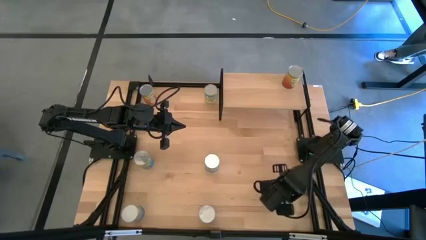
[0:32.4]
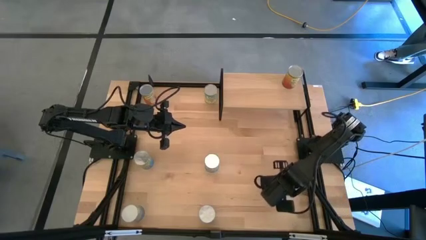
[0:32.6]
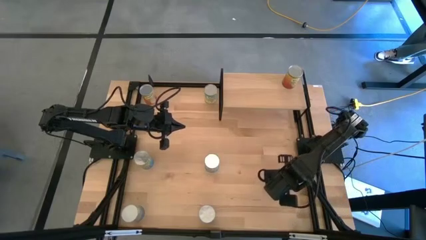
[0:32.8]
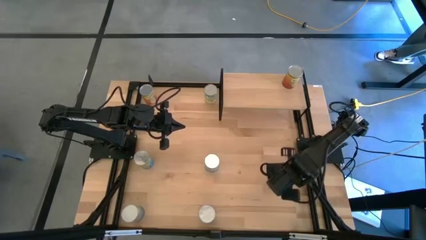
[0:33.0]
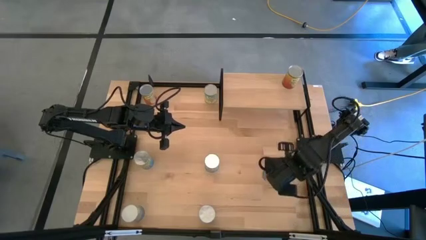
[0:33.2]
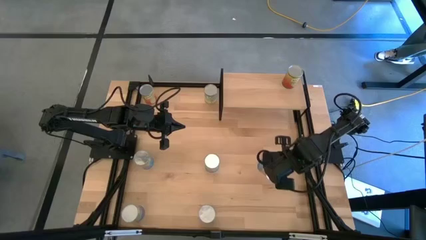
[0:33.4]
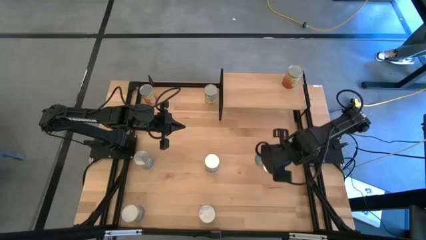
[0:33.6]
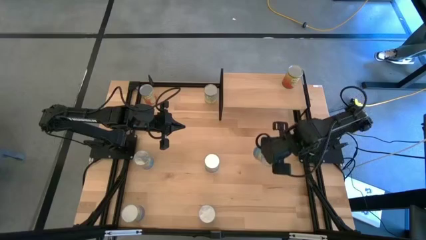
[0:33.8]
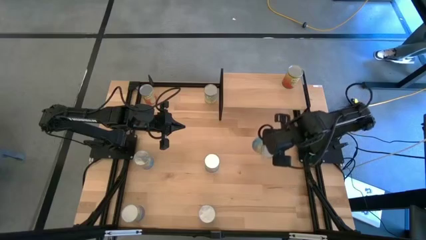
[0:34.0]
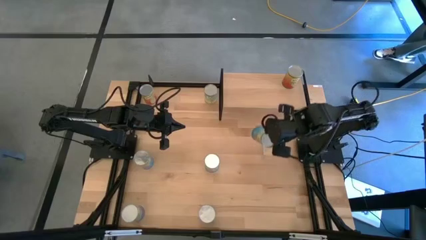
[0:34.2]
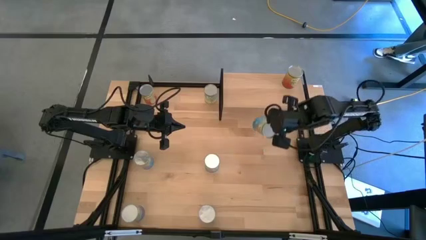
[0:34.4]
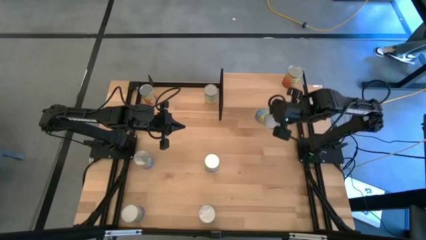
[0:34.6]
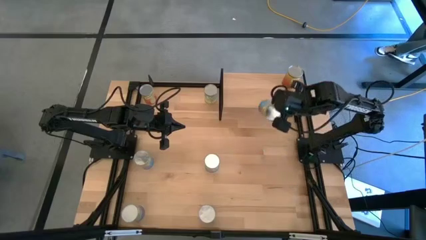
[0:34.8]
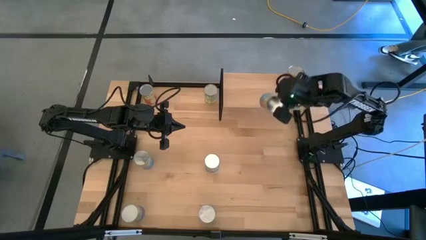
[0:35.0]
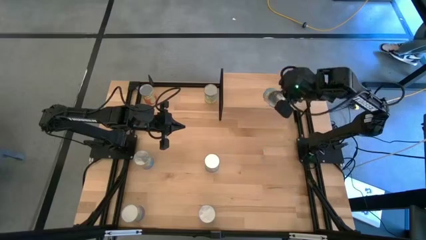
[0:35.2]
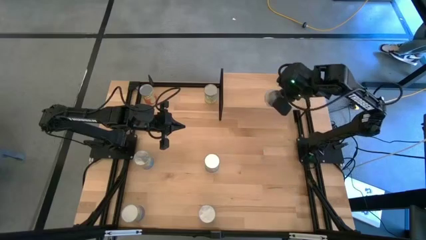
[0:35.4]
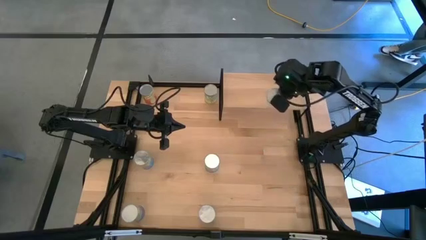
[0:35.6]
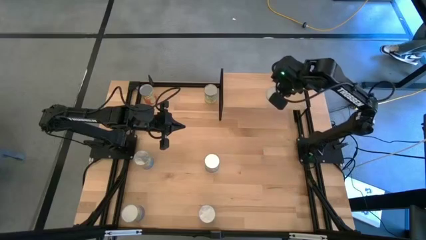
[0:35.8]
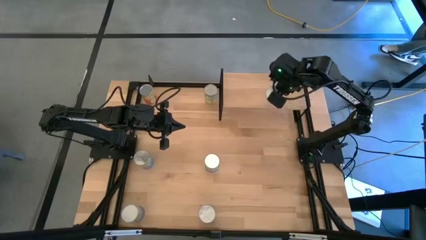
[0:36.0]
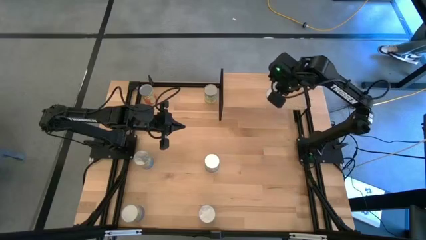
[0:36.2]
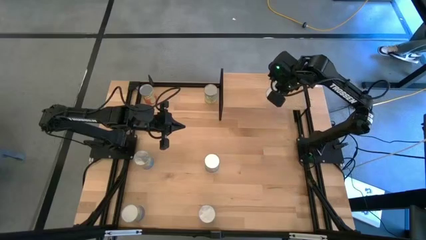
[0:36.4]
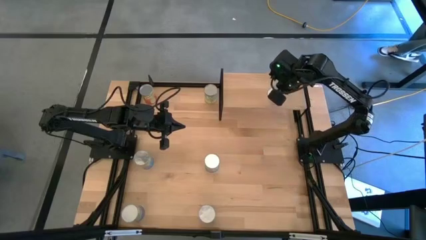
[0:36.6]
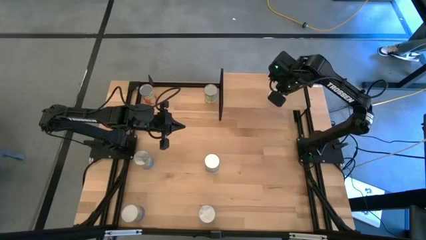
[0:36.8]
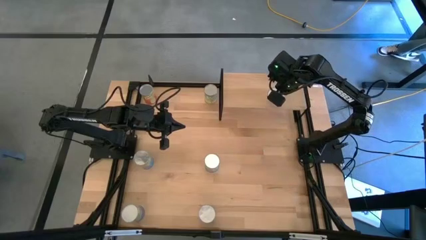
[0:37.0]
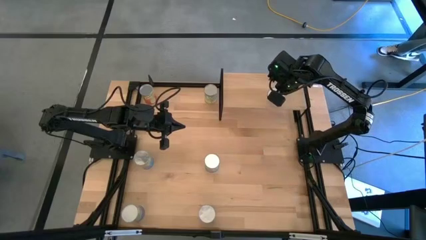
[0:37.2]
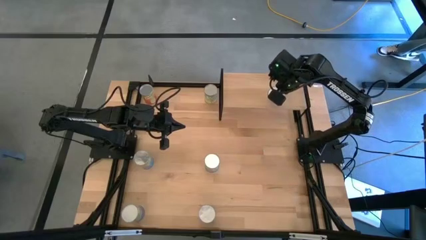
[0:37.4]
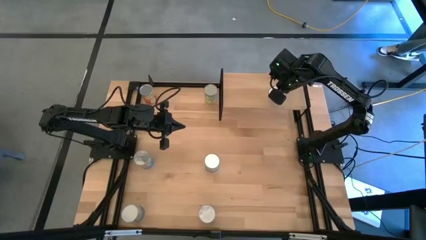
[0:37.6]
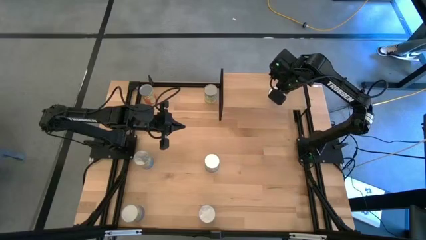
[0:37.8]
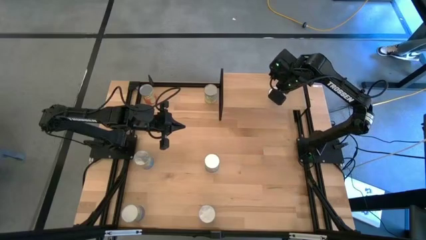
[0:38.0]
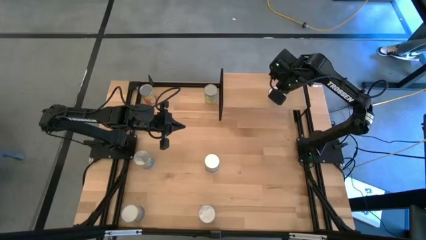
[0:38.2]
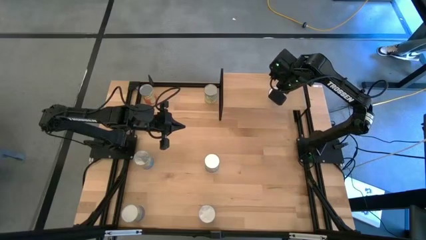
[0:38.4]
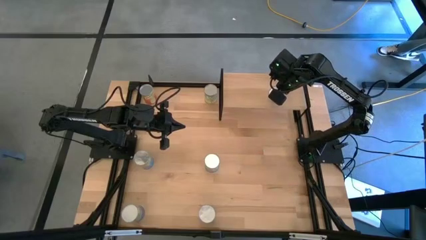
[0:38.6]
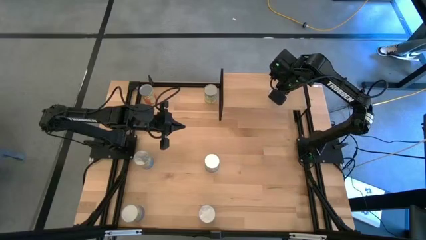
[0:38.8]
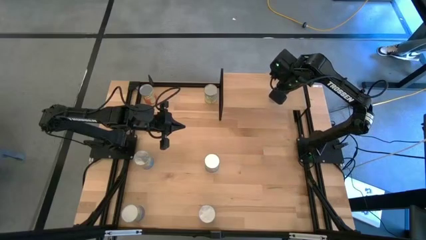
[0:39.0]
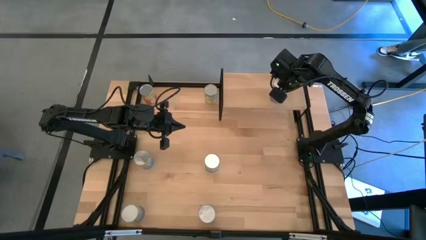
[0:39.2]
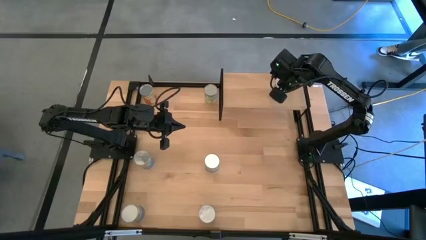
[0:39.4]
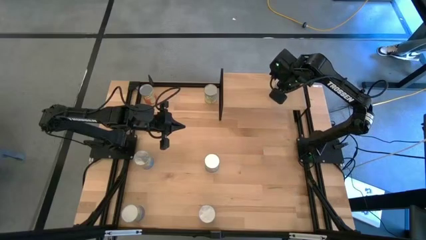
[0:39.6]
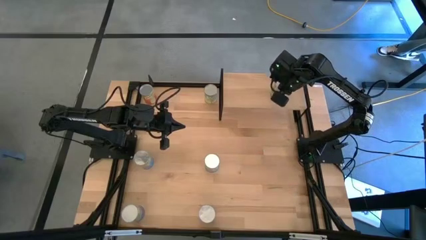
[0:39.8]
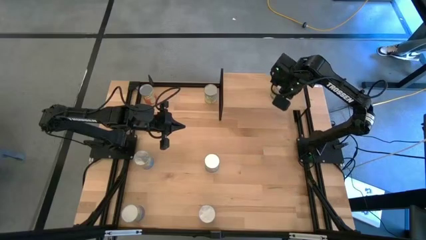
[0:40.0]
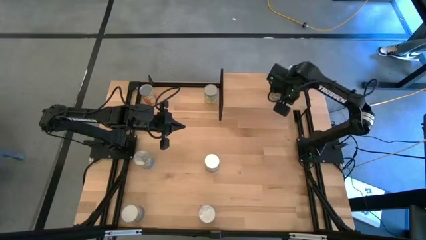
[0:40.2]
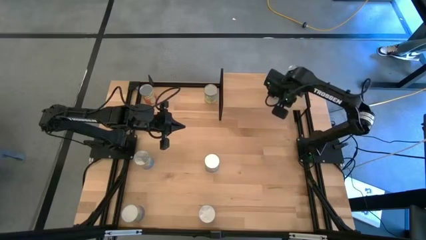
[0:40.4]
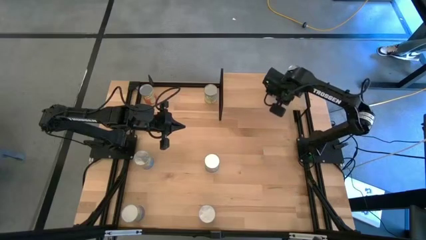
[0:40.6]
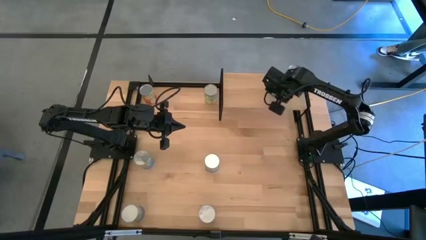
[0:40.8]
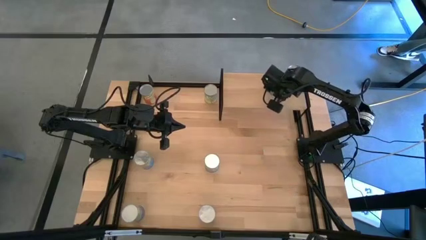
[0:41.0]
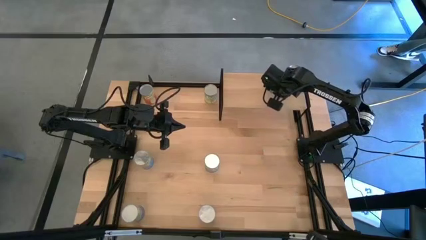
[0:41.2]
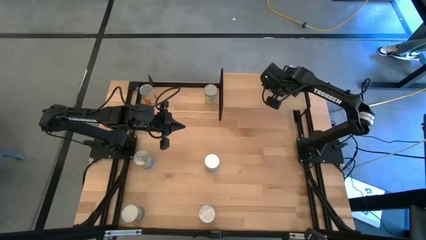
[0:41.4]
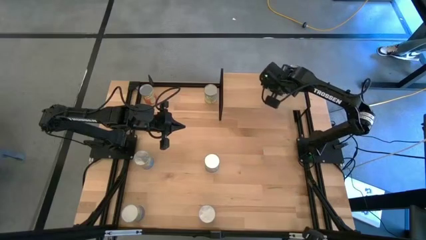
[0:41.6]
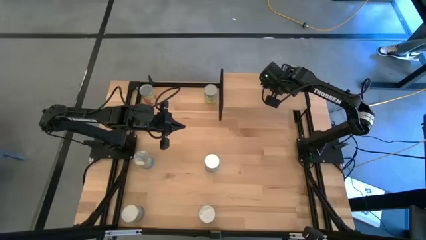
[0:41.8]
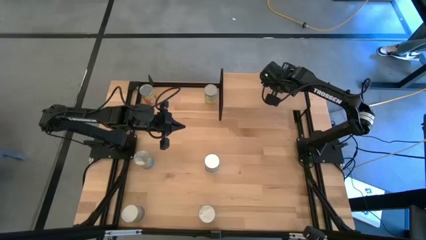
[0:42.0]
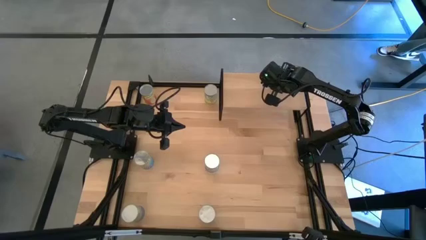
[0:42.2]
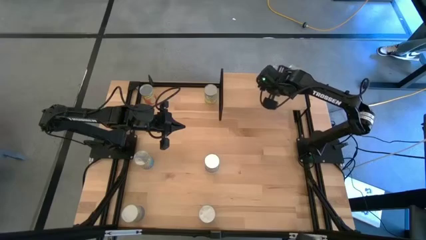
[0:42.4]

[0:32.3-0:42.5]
Task: Pick and place cans onto a shelf
Put the canned tomatoes on the shelf

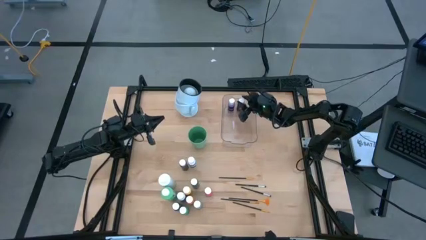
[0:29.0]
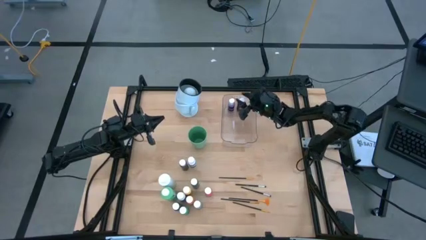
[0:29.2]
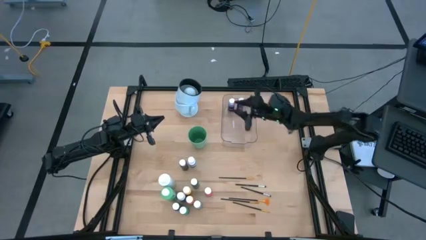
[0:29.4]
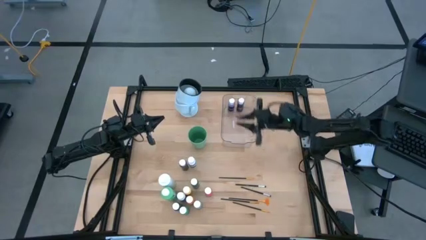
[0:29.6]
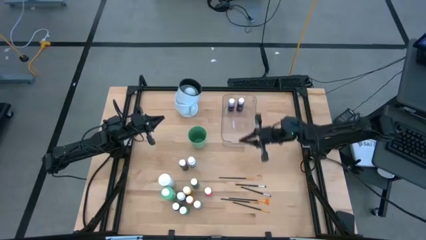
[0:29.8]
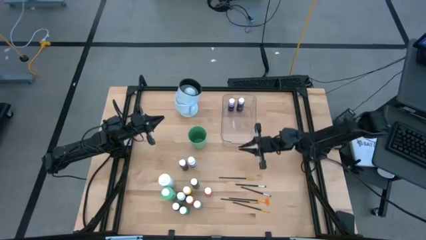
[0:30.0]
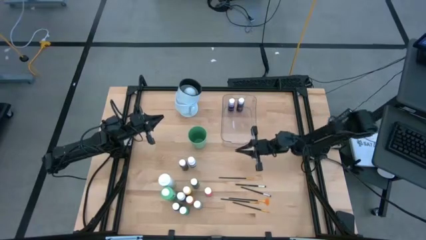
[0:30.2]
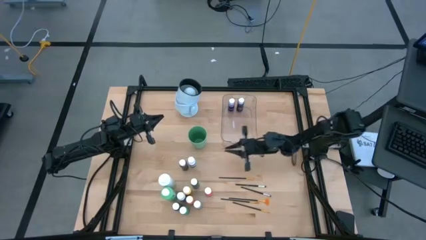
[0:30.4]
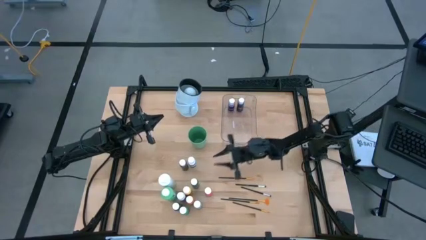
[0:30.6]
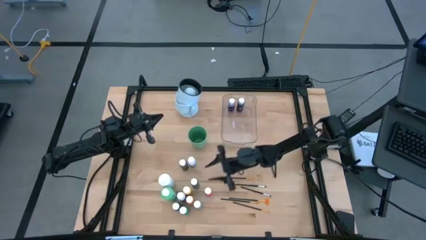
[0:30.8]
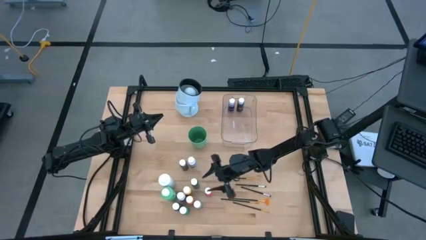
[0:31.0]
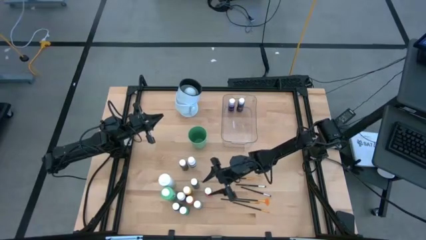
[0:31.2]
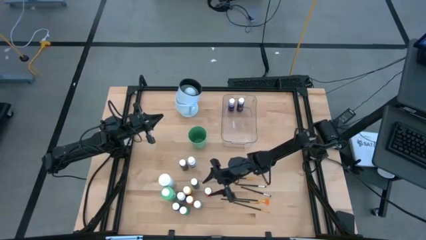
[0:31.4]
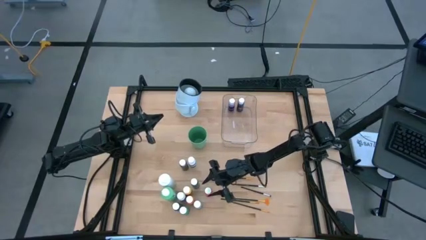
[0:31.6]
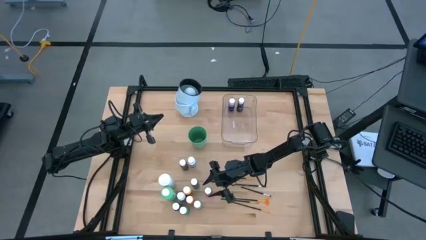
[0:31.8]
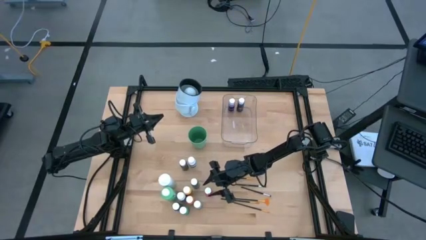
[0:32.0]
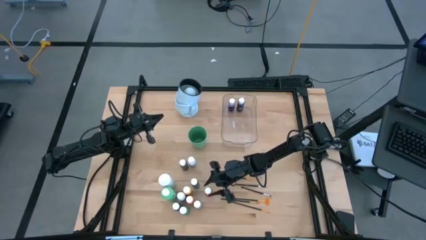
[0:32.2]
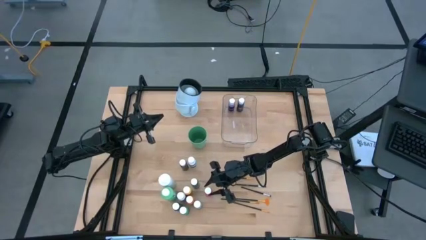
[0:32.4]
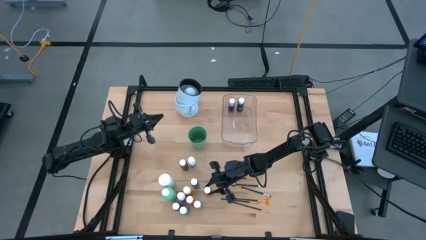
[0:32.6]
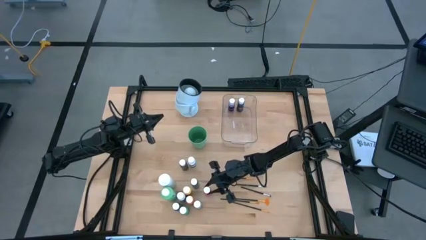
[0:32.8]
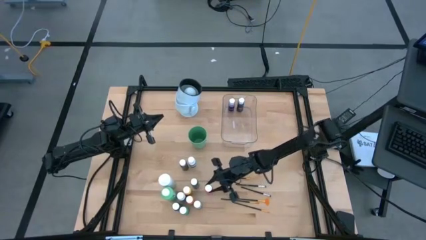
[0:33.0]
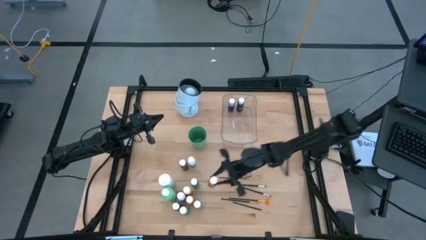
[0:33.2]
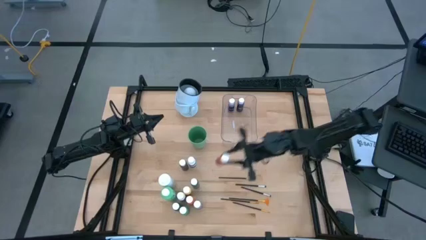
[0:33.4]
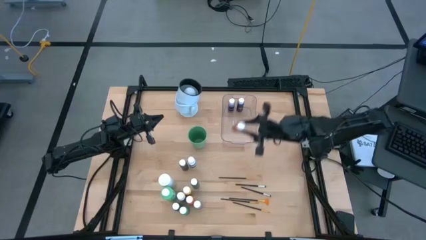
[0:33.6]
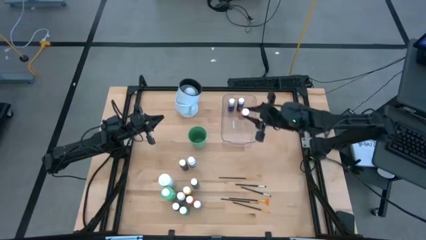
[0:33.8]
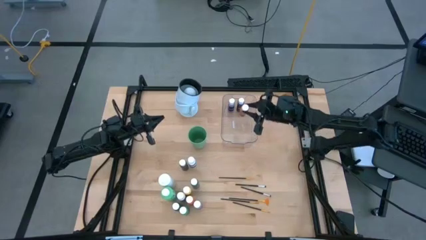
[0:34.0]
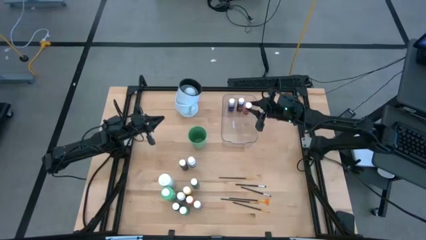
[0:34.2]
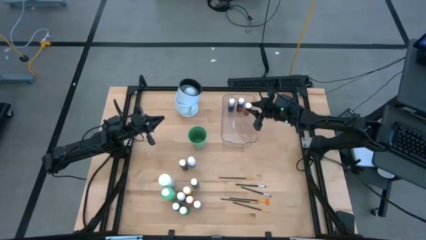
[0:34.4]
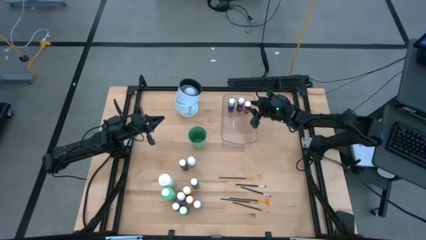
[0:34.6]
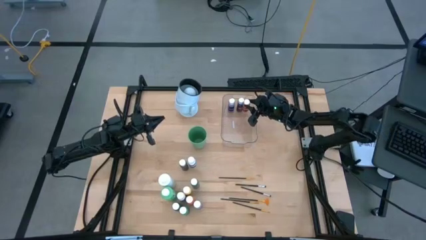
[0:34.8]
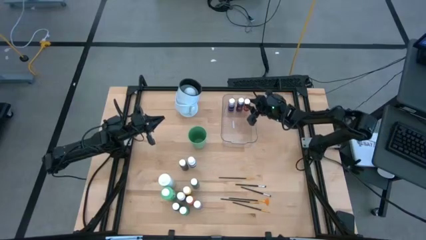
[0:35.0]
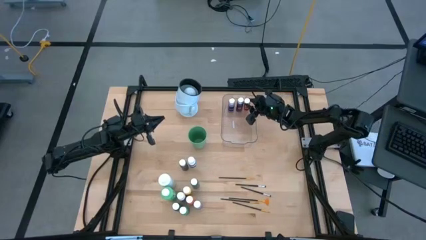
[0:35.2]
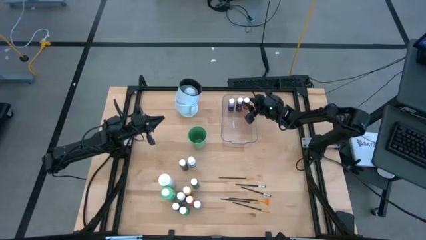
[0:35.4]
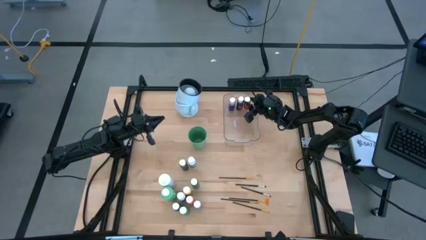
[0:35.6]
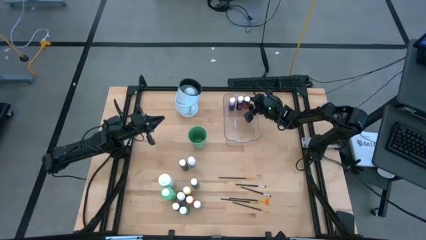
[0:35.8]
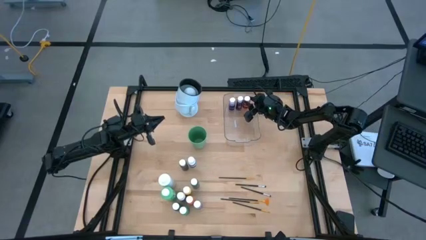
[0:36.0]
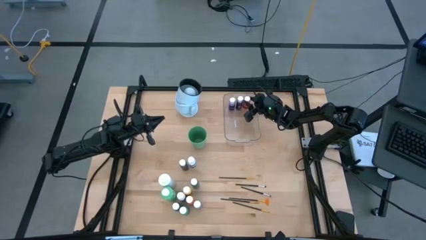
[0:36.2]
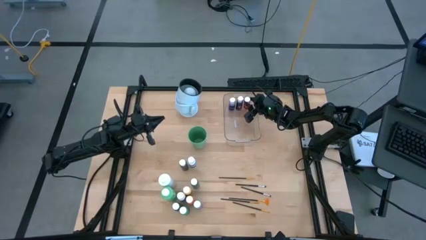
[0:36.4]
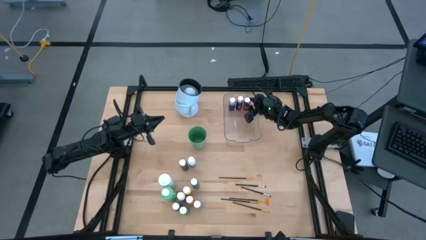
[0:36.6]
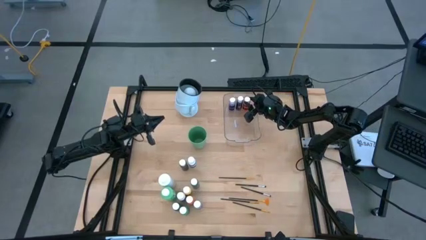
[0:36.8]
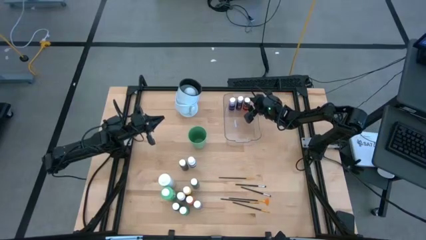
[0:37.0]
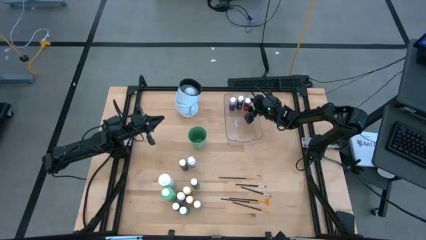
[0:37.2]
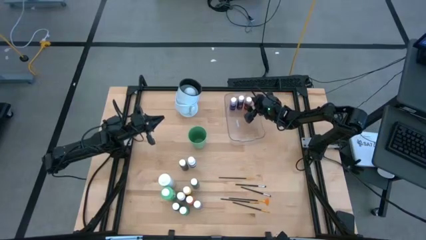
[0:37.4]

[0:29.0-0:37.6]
Task: Pick & Place Paint Supplies
Put the right orange paint bottle into the transparent bin
